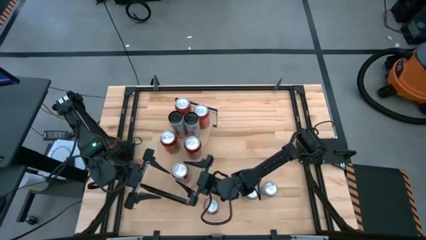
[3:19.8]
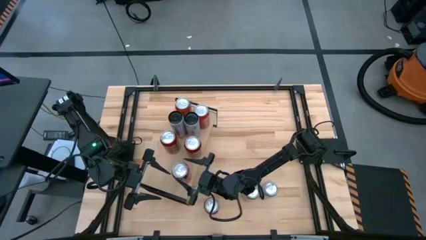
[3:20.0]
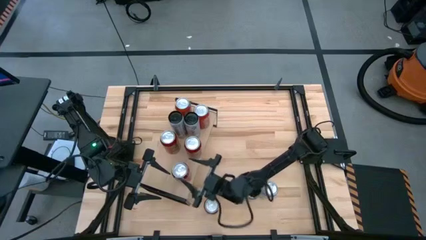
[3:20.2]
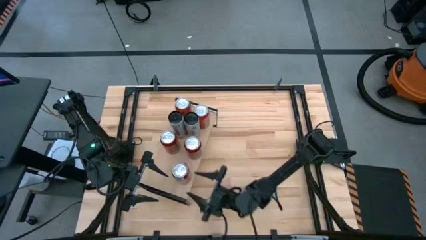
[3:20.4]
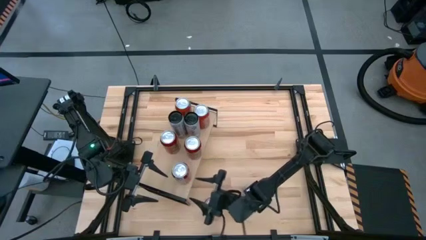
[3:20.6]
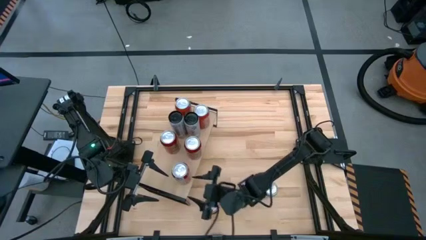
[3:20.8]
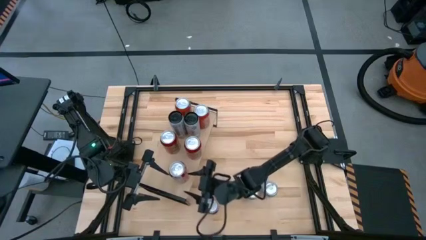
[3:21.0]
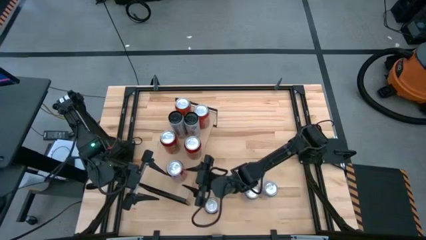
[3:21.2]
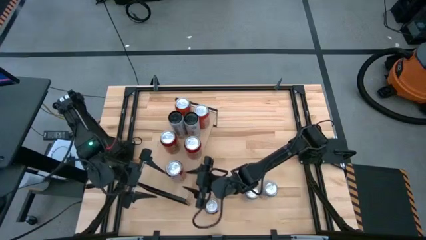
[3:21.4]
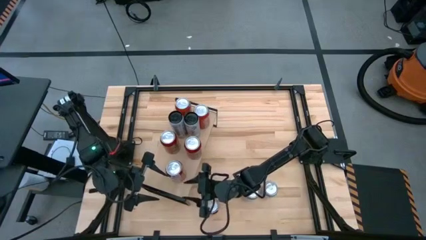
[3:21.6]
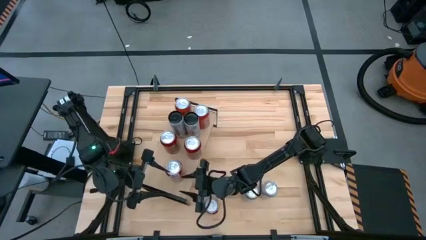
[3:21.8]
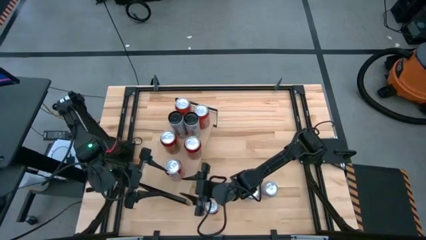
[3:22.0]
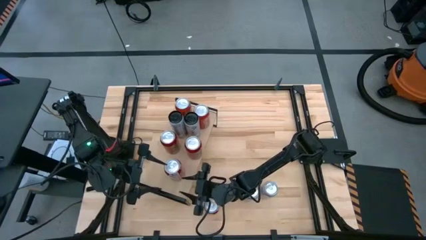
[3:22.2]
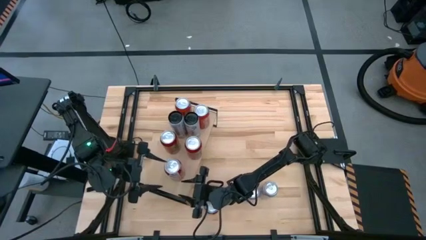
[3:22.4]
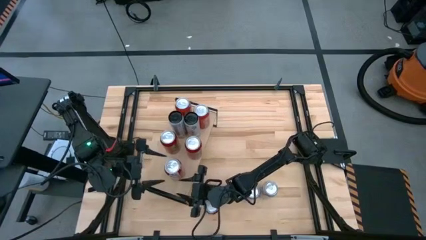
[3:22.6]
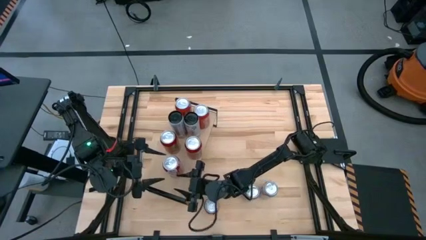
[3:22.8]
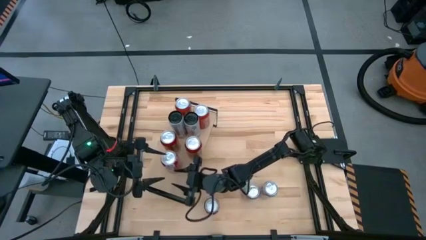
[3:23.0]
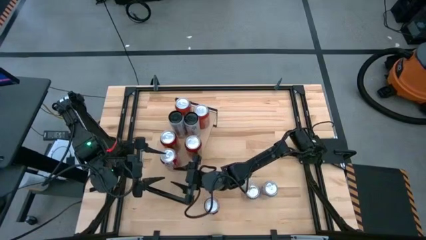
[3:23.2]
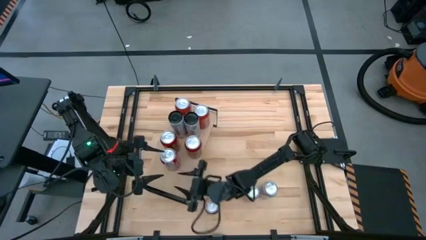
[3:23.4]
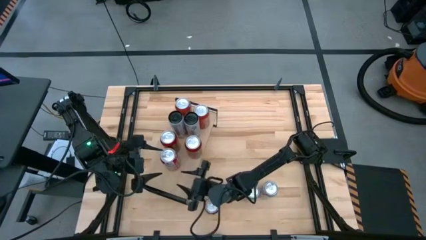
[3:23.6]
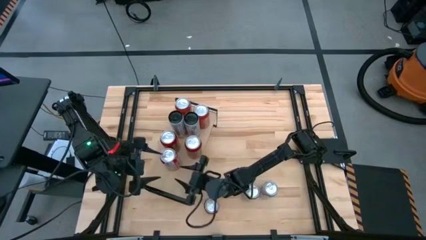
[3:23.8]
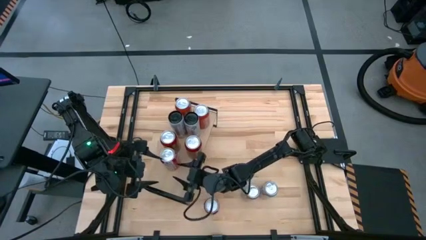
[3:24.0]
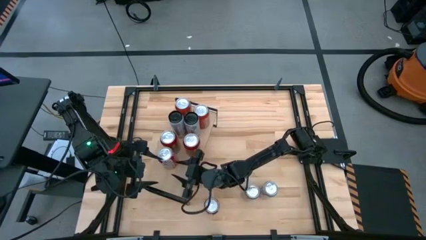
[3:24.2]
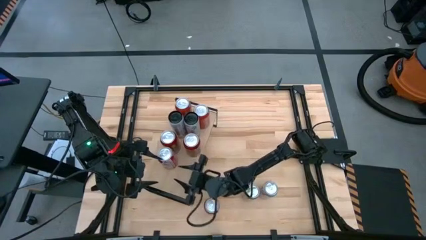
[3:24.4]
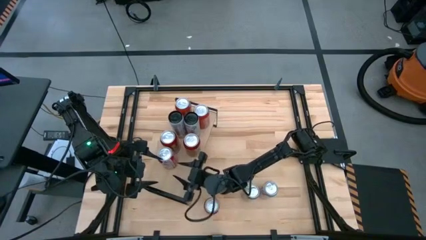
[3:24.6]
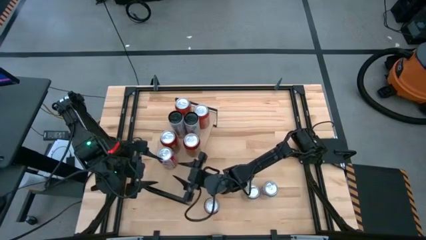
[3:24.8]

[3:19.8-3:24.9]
Task: Place canned beverage on shelf
Adjust the red soda can on the shelf

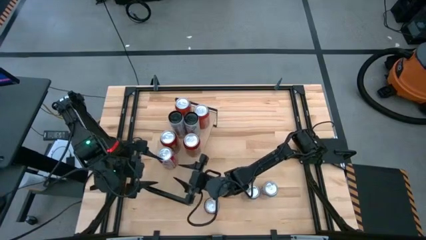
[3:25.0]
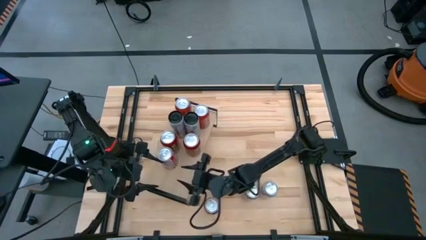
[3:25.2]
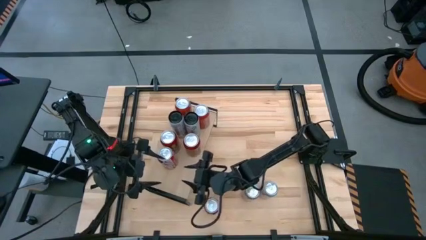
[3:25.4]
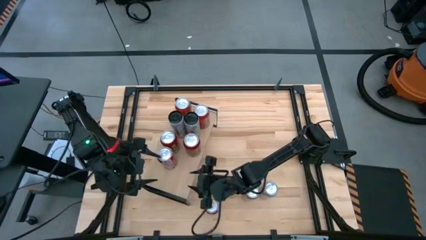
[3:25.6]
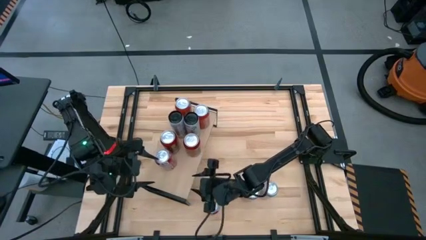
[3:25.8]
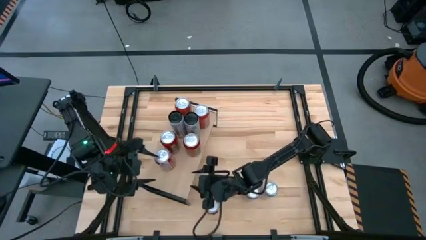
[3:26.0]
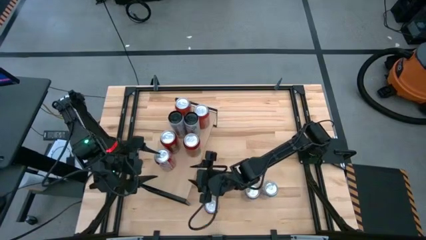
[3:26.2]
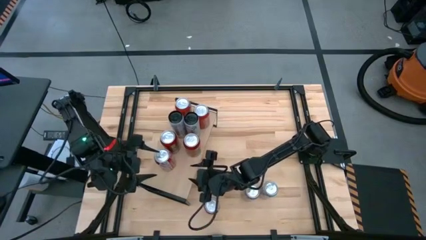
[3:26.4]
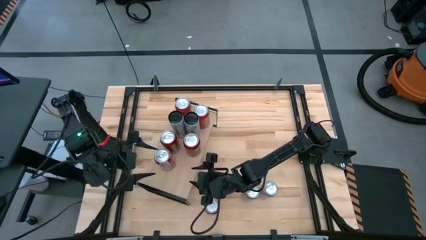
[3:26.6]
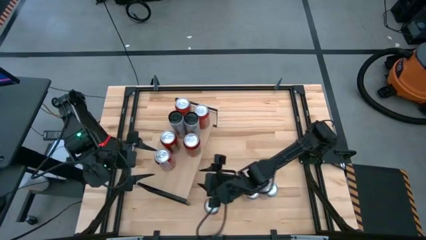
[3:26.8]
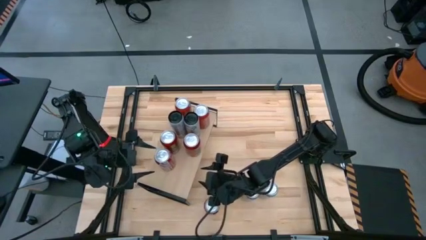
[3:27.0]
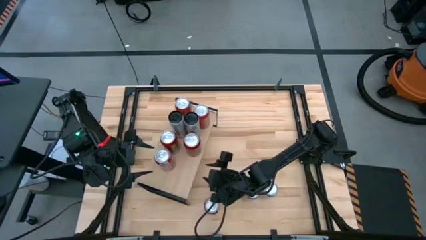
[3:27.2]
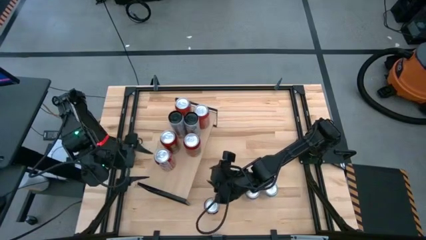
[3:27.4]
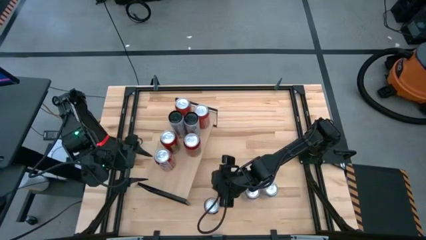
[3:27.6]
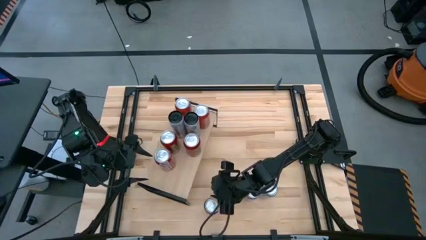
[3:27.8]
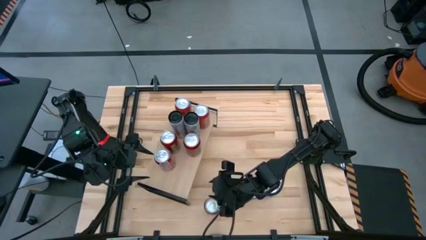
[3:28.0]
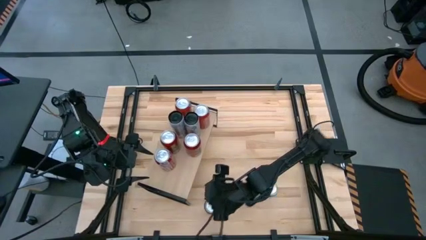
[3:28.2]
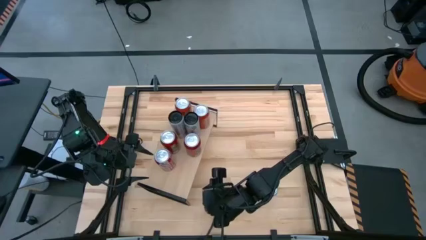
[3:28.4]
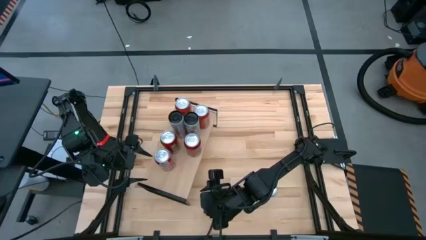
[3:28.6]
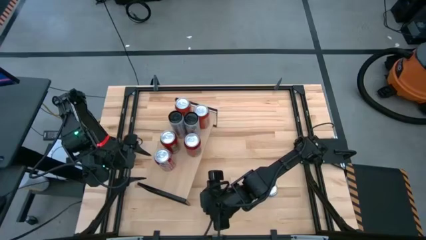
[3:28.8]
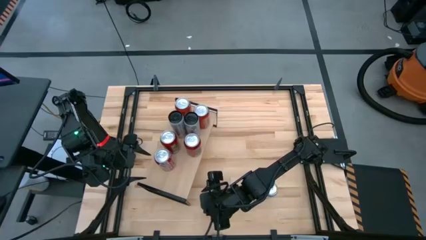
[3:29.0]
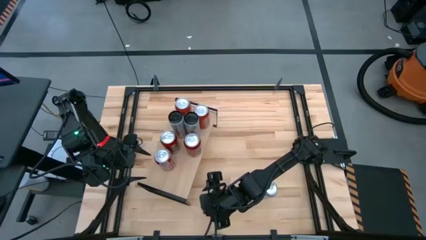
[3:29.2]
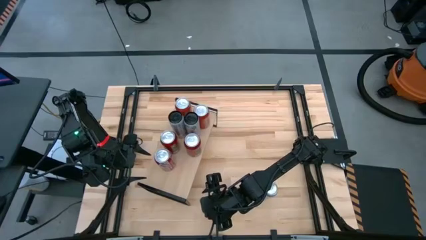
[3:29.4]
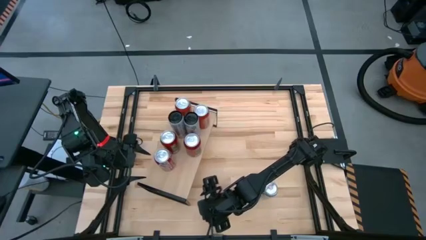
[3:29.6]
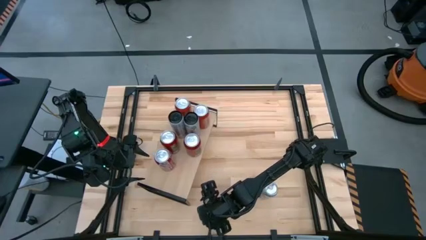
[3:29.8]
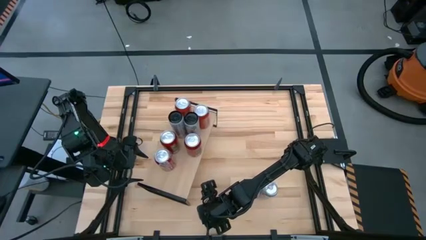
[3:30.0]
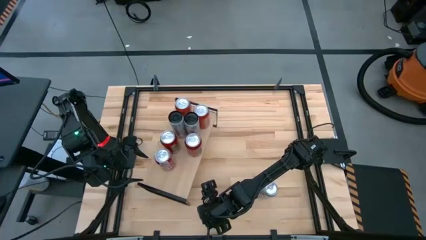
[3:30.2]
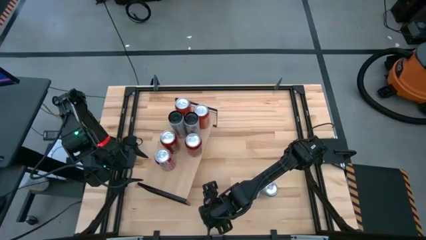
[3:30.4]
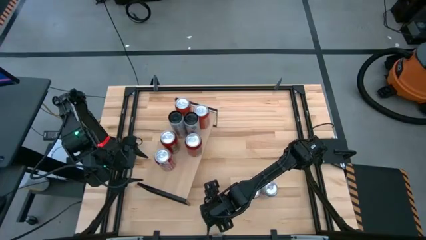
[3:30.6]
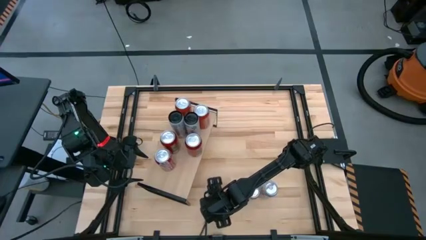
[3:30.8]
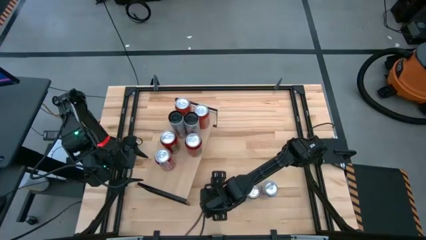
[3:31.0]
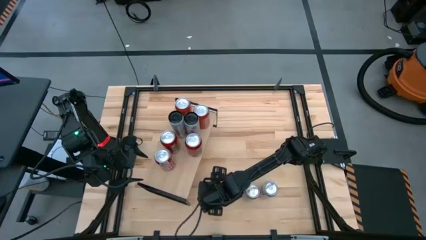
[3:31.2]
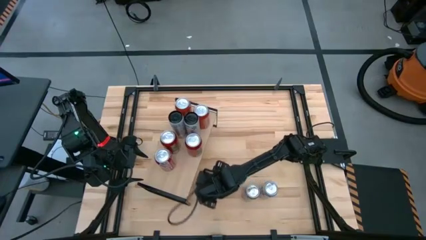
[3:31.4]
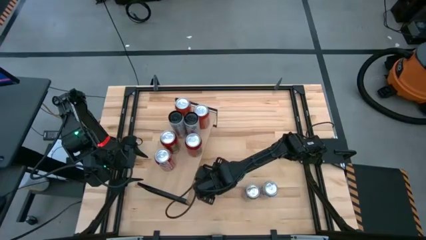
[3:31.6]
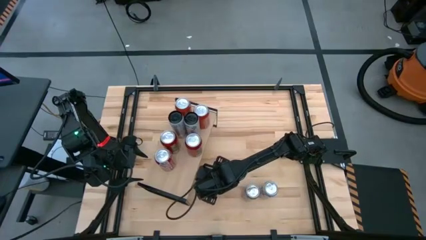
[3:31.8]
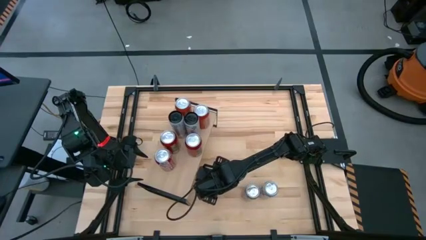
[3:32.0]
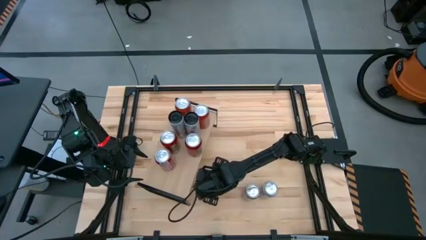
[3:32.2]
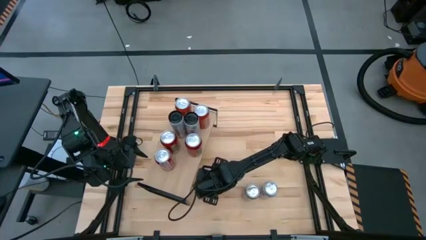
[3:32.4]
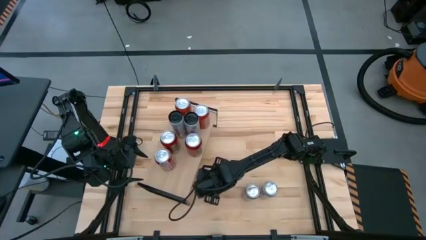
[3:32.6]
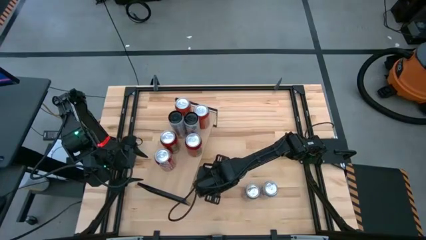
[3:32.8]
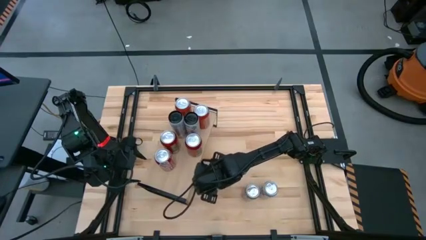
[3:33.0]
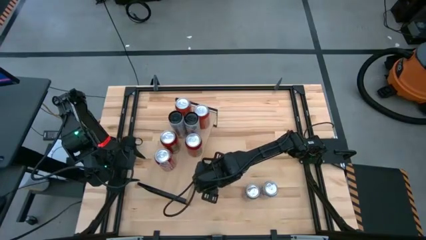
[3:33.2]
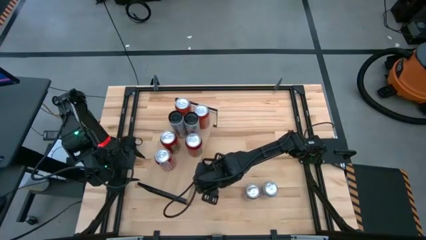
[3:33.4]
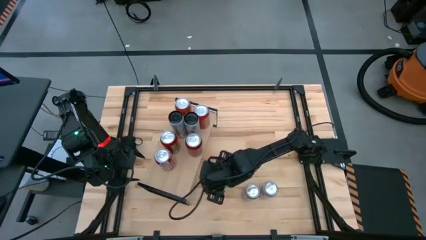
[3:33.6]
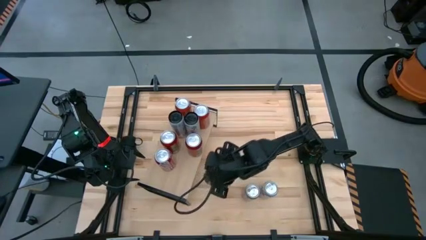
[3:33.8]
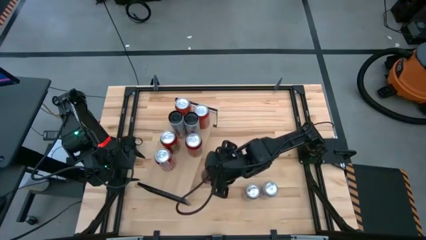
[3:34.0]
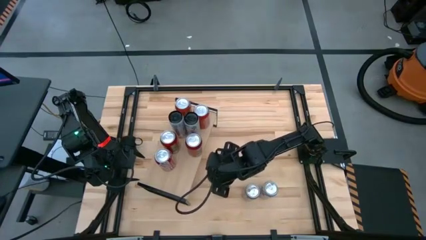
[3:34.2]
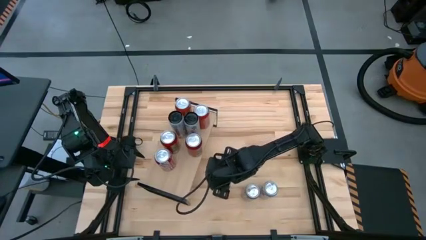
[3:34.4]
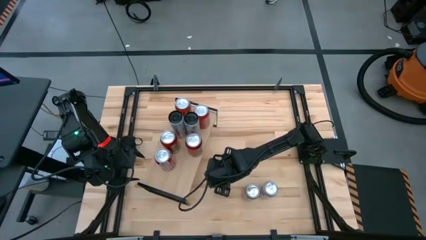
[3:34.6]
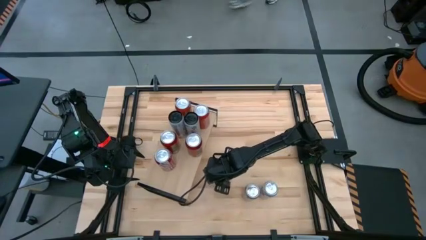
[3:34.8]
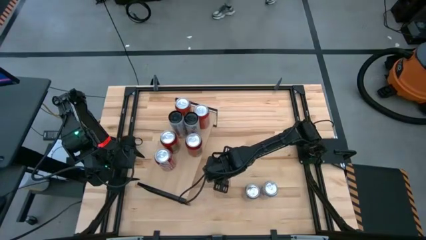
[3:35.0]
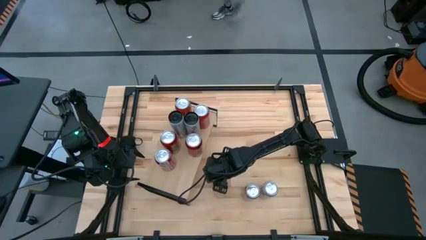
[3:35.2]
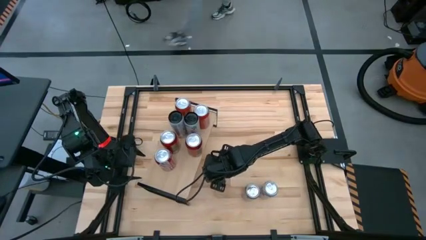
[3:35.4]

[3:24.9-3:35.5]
Put the red soda can on the shelf
